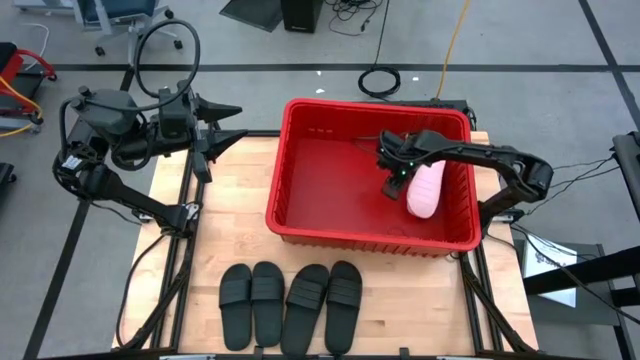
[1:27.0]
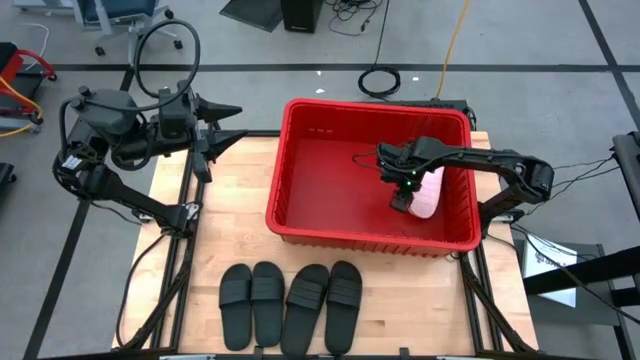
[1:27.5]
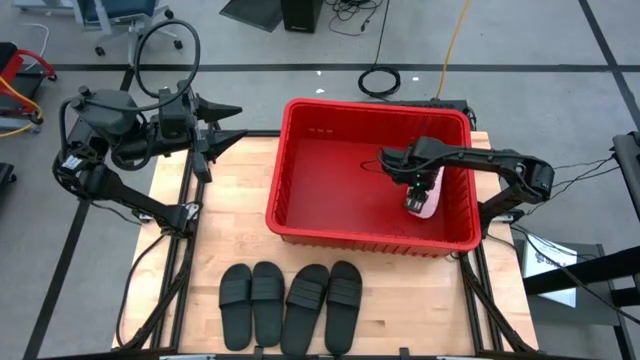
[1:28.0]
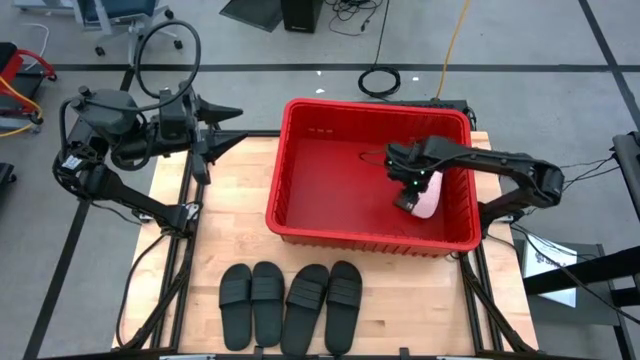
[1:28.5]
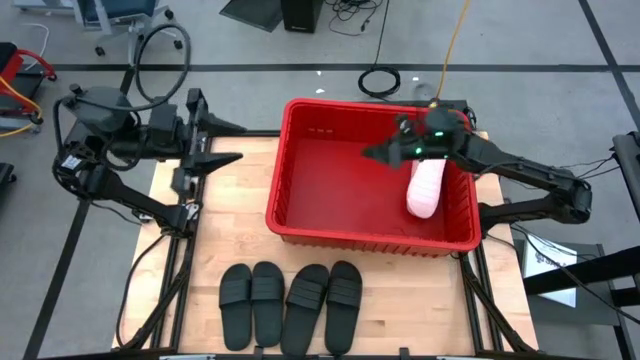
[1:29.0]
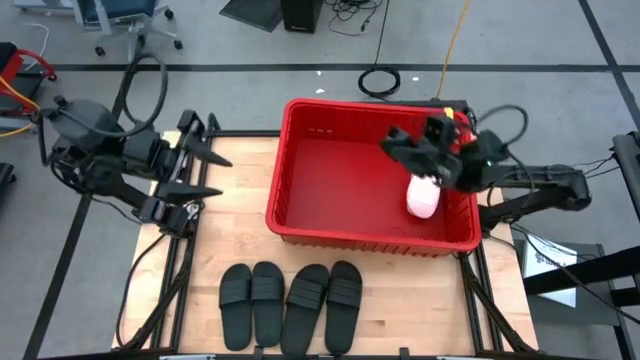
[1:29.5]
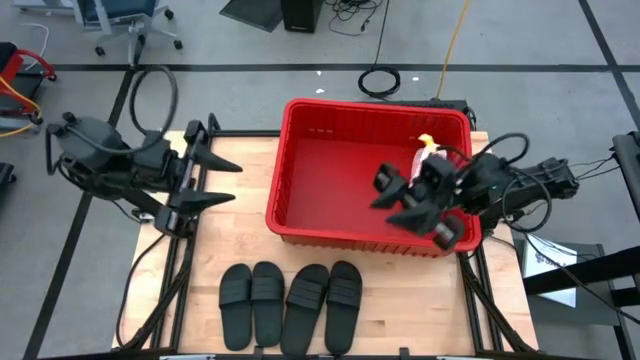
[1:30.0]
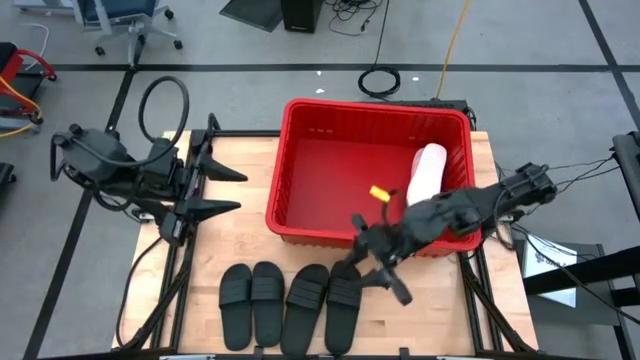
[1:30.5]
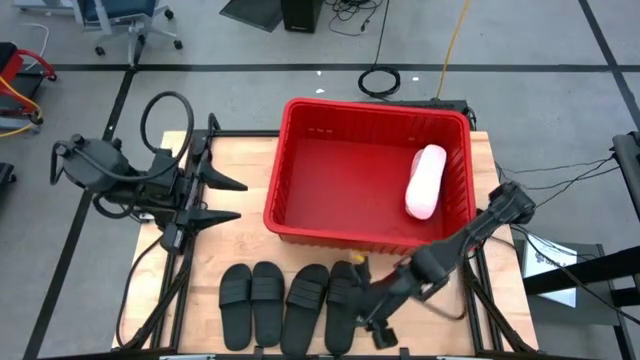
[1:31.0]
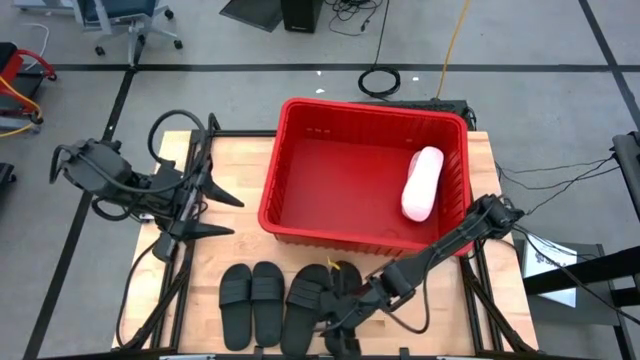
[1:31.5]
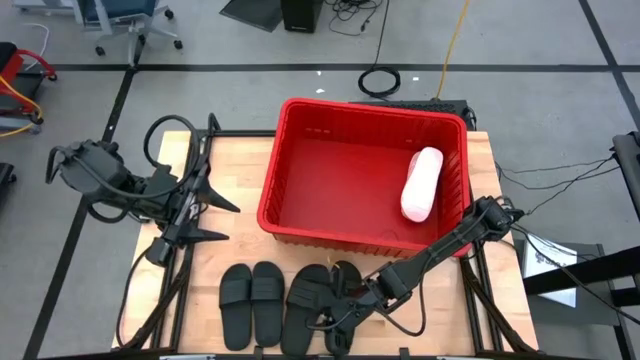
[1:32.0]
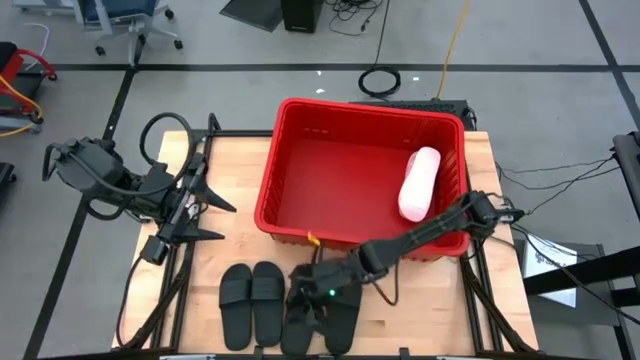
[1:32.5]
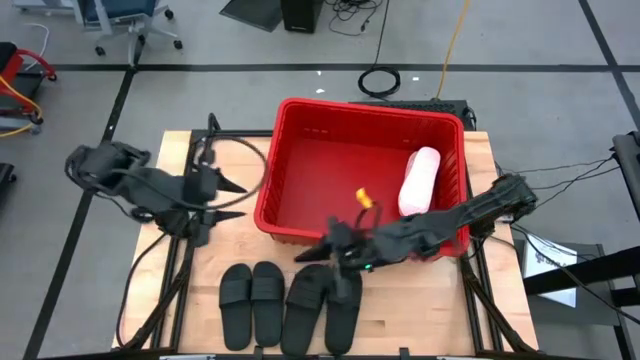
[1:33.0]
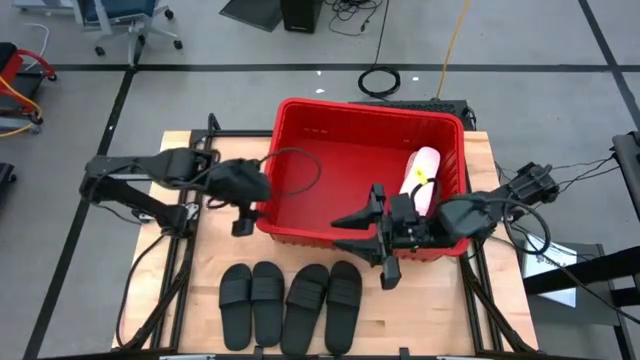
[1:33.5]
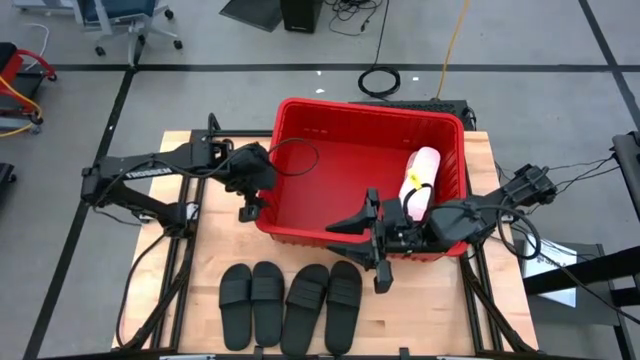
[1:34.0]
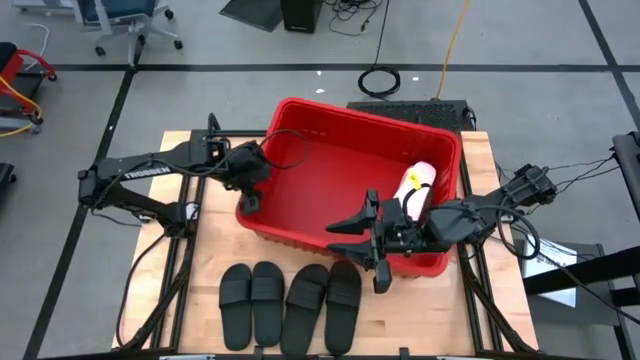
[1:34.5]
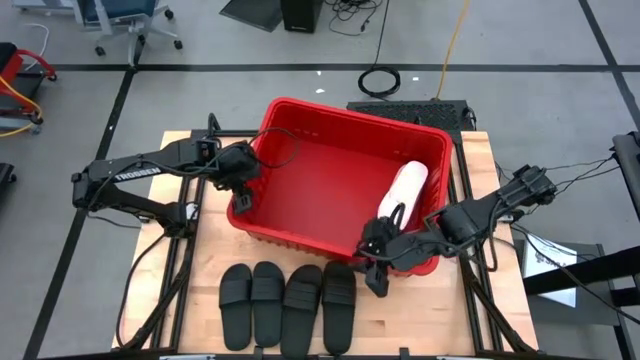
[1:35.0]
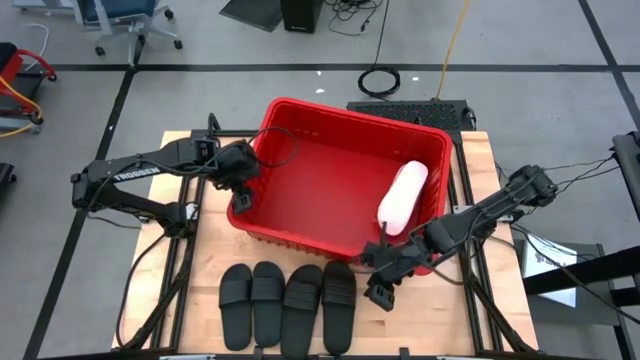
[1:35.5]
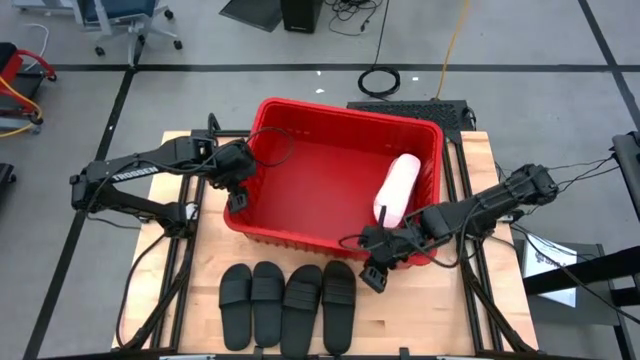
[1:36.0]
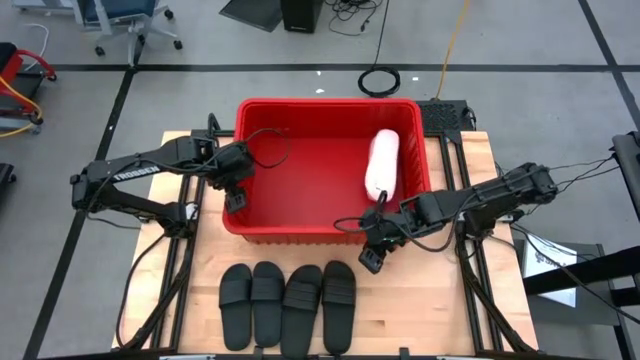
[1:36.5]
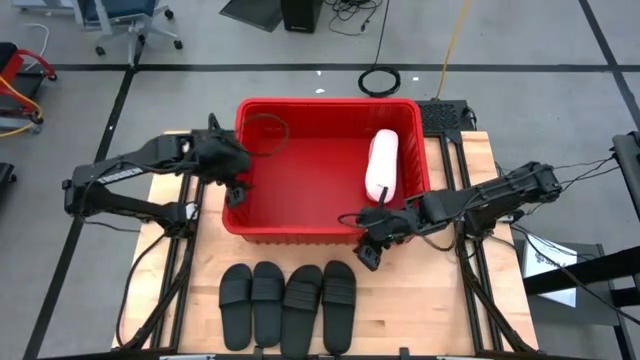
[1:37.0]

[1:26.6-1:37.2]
Task: Pick and place slides into bin
Adjust the red bin

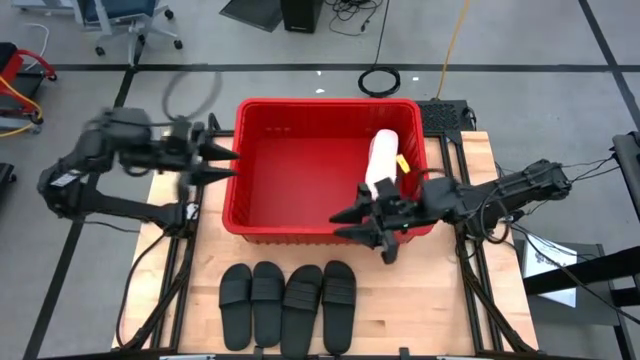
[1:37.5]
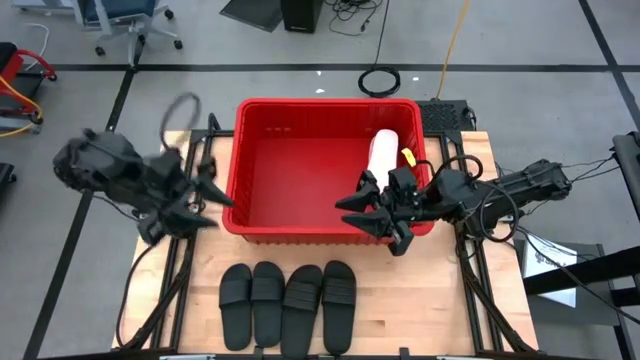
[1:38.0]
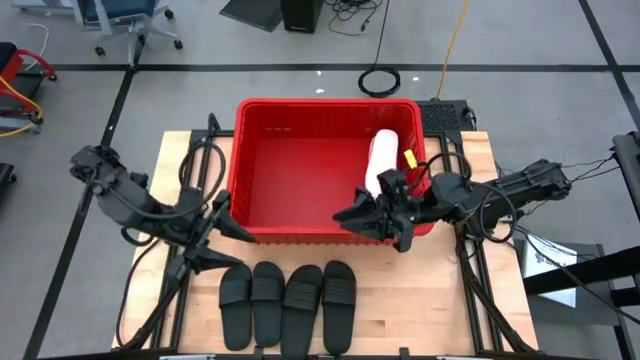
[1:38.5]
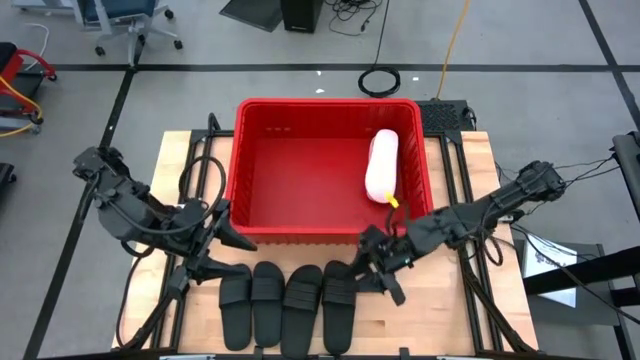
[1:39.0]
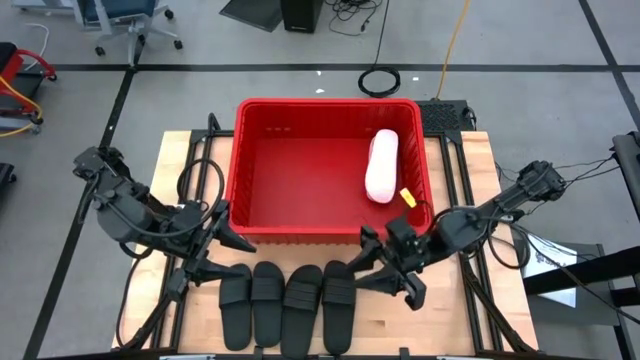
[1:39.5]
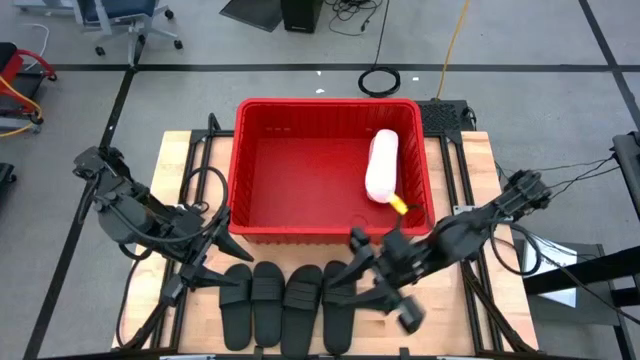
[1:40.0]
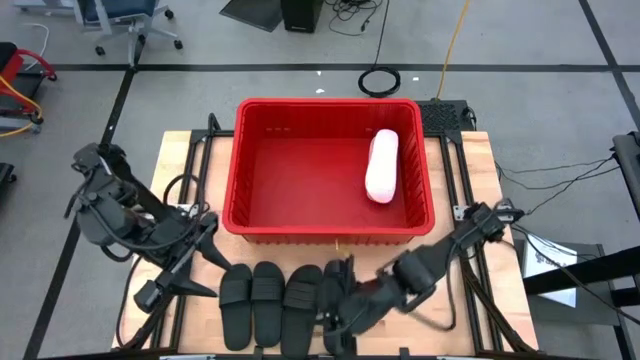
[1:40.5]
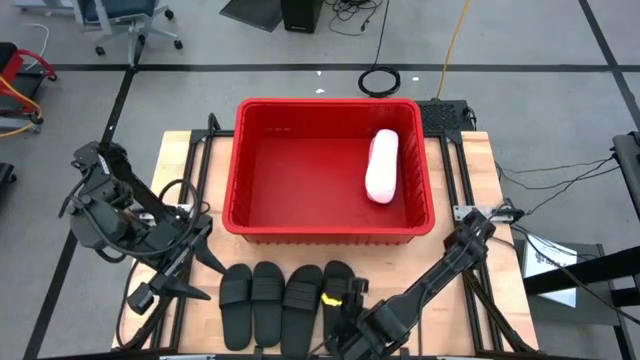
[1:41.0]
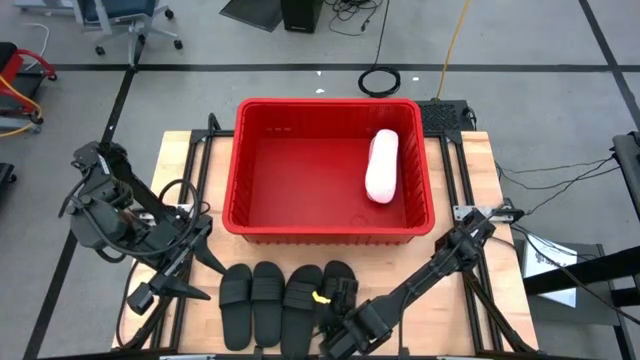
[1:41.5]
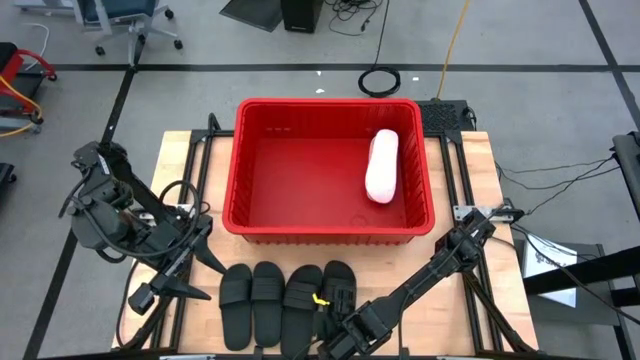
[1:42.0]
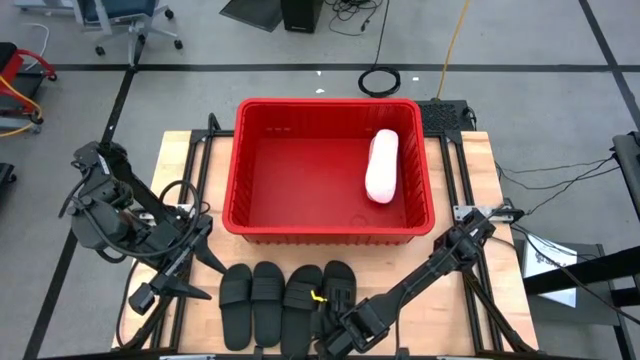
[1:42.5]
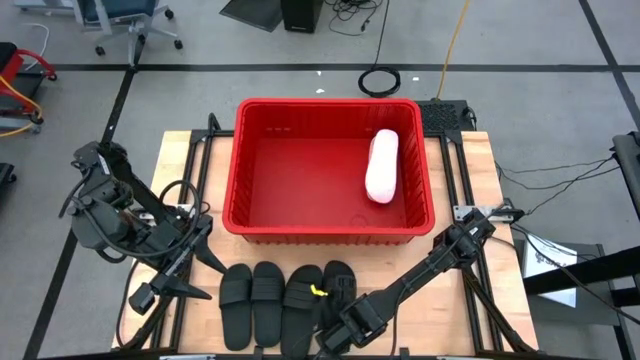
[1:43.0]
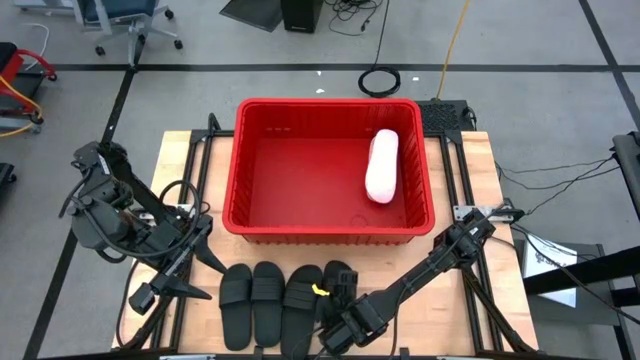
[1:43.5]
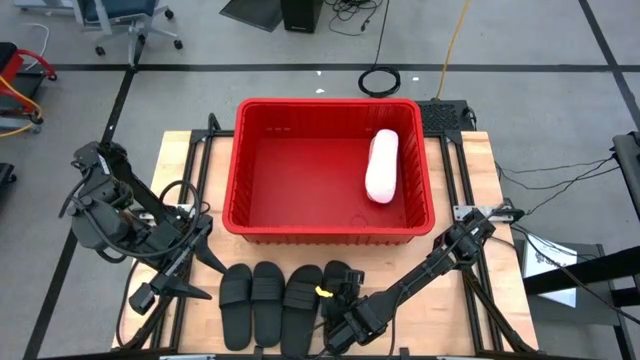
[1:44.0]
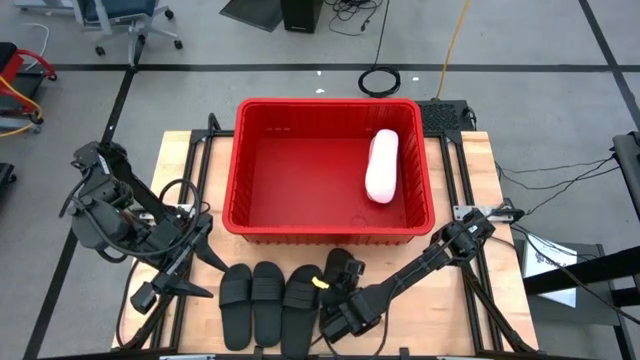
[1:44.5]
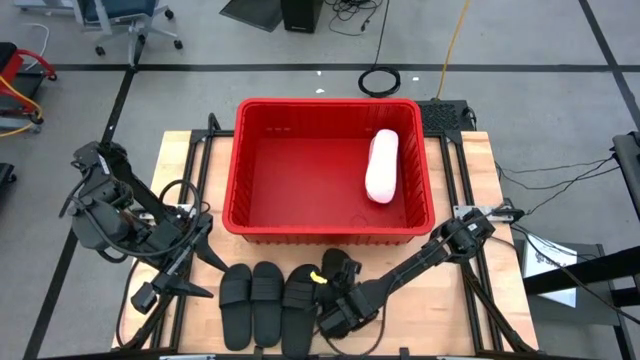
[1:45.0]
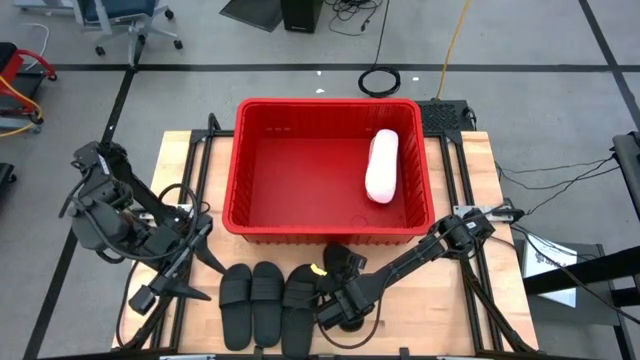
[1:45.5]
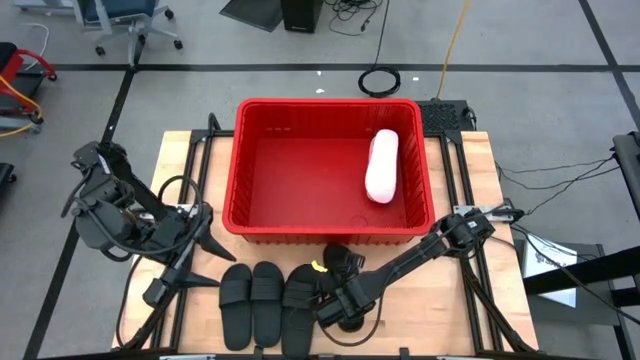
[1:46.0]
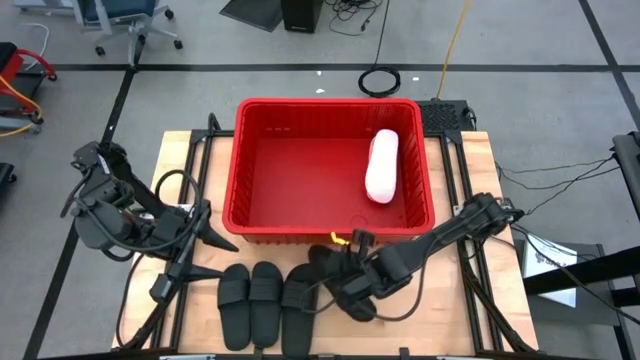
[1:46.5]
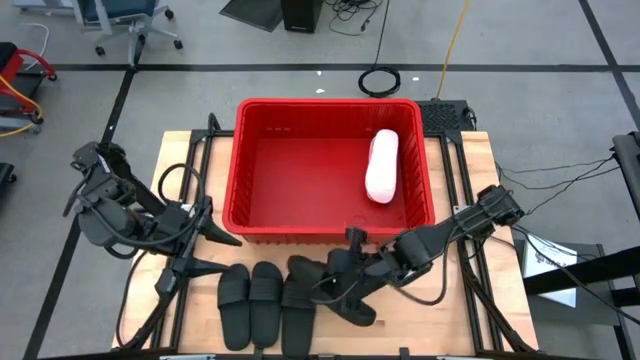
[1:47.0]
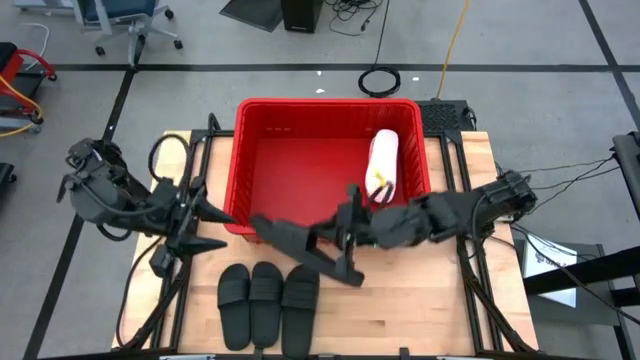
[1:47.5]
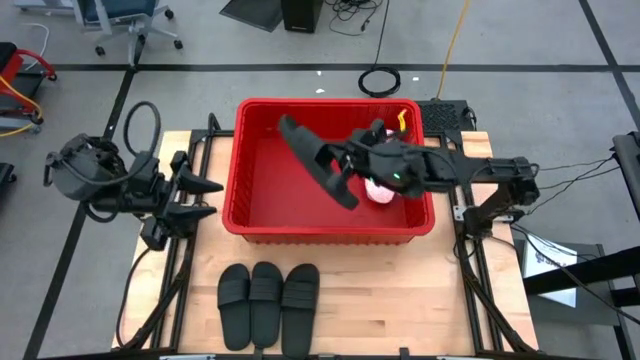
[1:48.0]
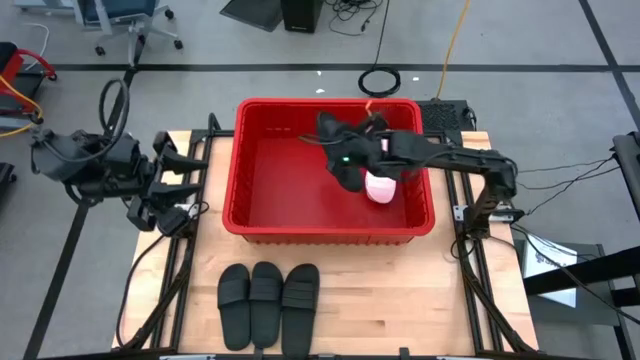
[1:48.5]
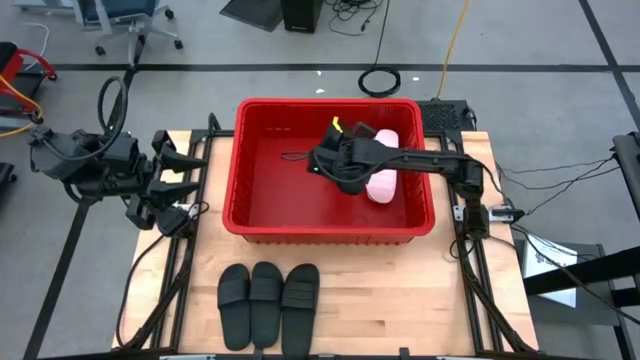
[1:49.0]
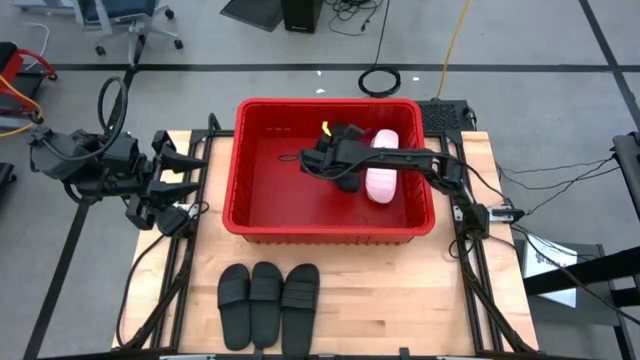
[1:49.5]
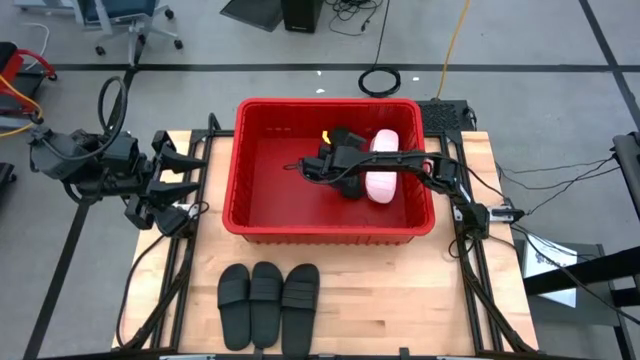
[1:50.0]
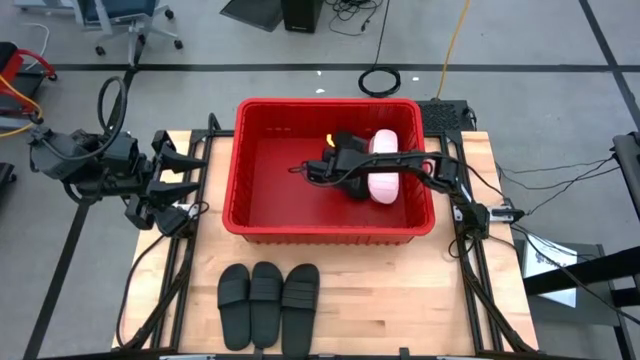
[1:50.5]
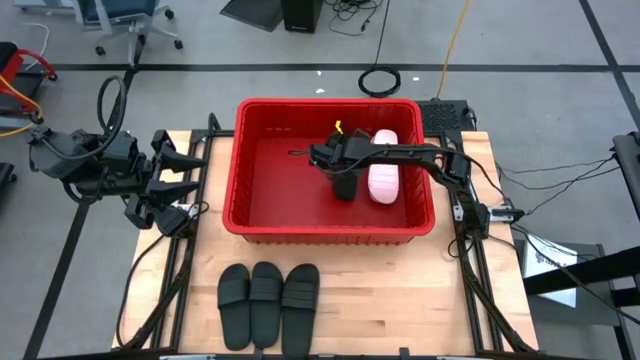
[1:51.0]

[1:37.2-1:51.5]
Put the black slide into the red bin
